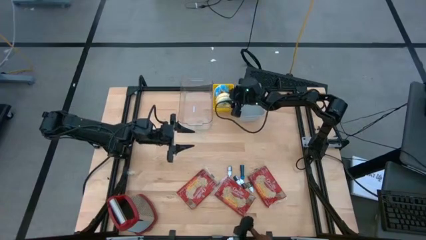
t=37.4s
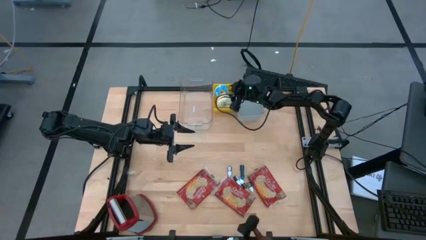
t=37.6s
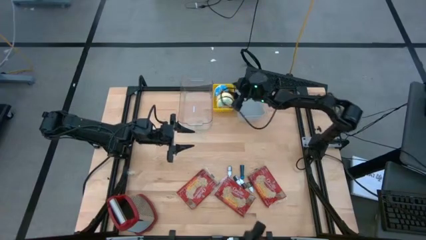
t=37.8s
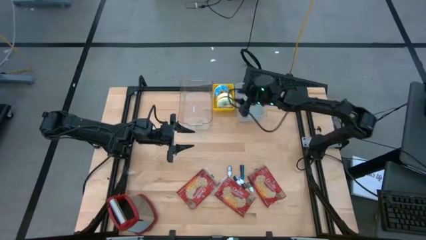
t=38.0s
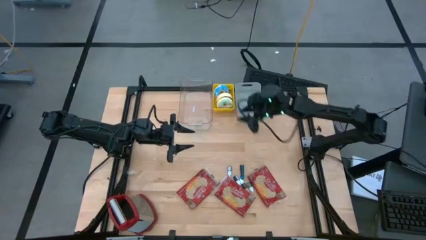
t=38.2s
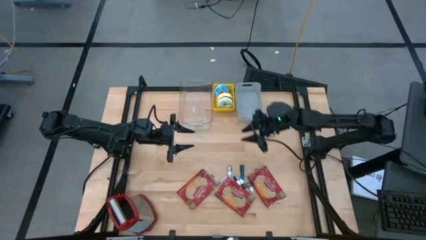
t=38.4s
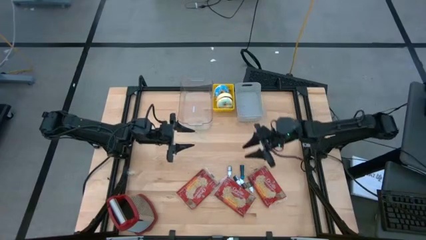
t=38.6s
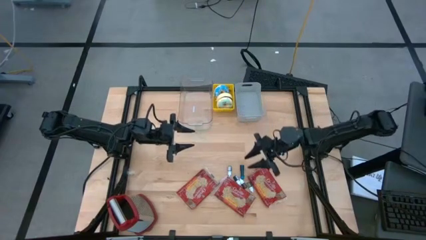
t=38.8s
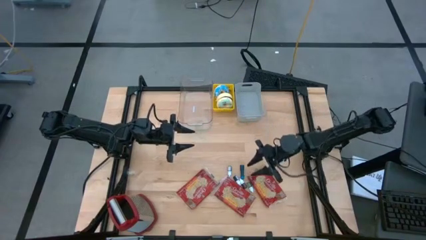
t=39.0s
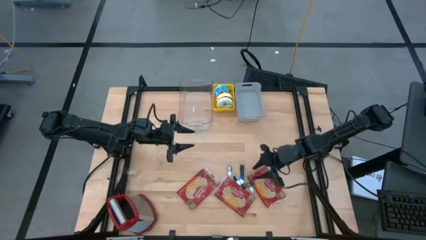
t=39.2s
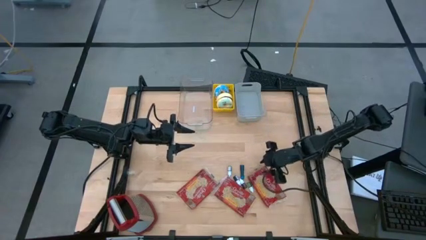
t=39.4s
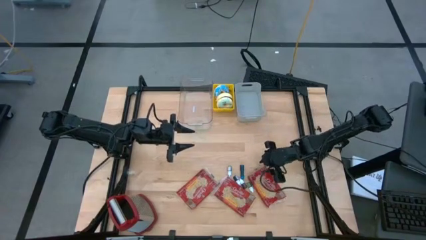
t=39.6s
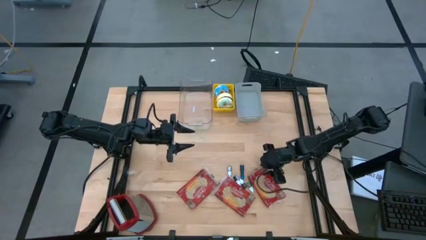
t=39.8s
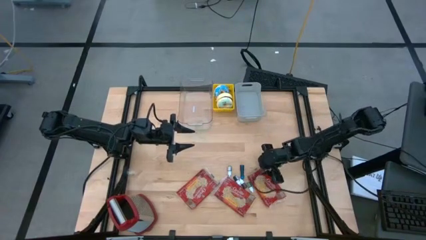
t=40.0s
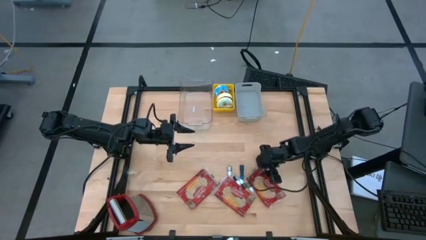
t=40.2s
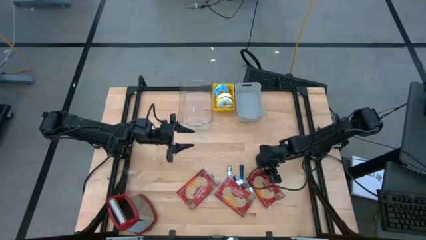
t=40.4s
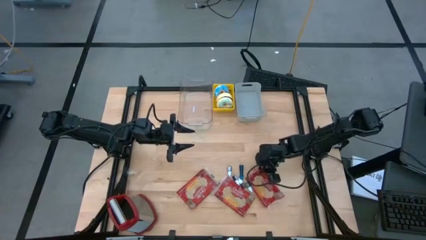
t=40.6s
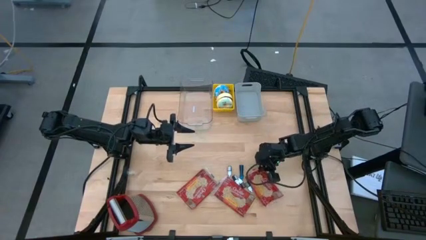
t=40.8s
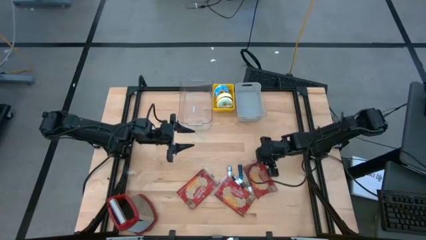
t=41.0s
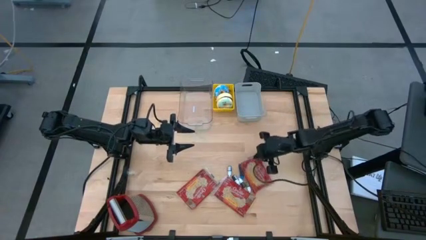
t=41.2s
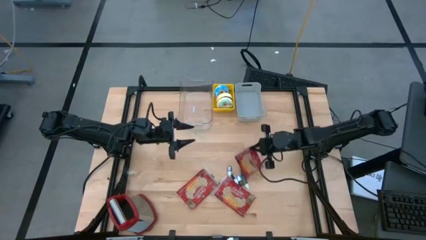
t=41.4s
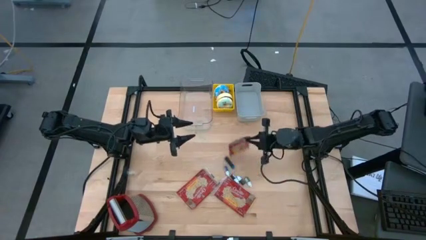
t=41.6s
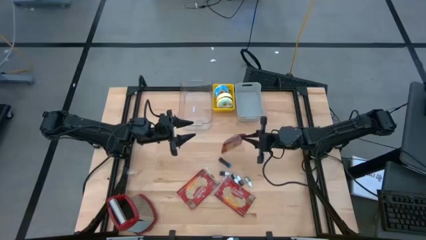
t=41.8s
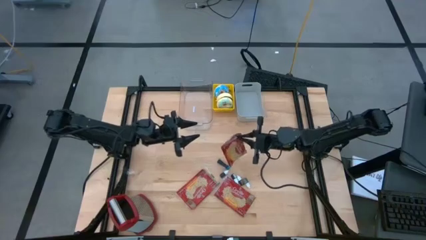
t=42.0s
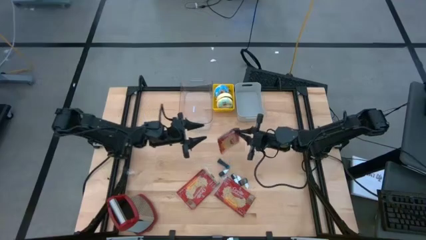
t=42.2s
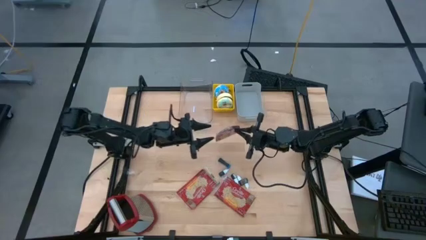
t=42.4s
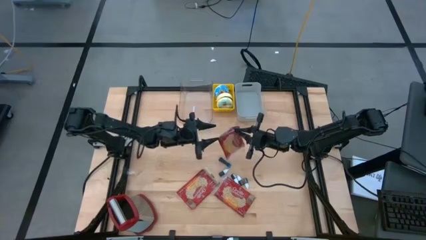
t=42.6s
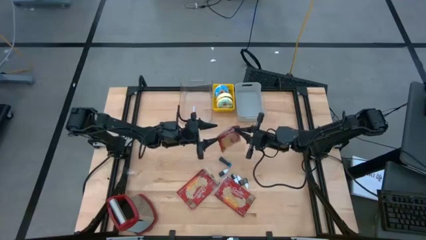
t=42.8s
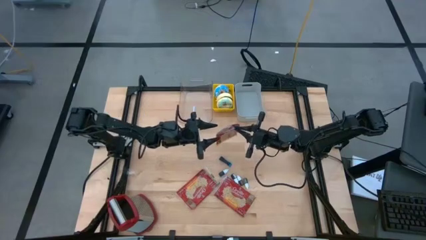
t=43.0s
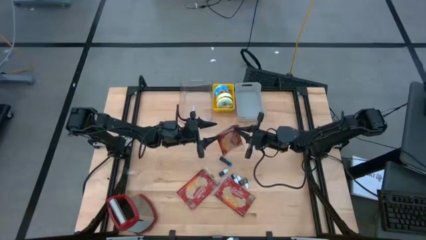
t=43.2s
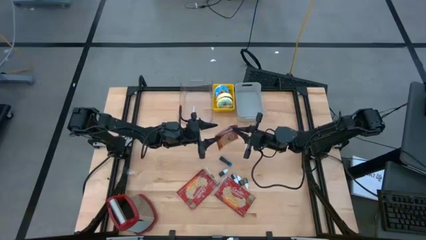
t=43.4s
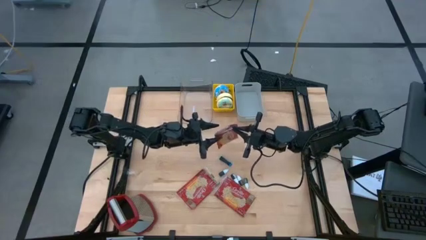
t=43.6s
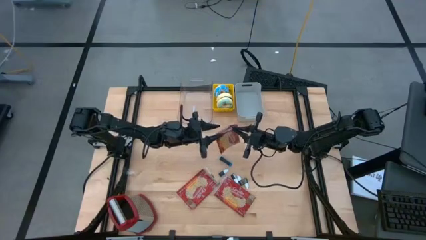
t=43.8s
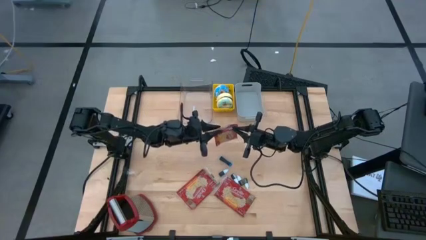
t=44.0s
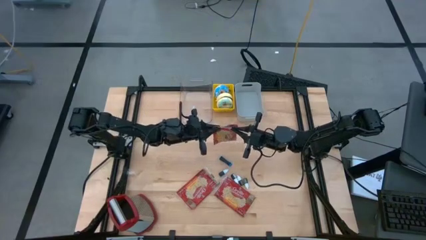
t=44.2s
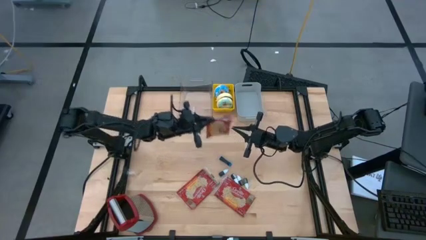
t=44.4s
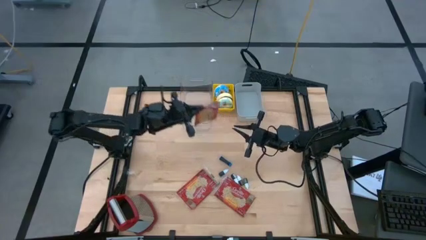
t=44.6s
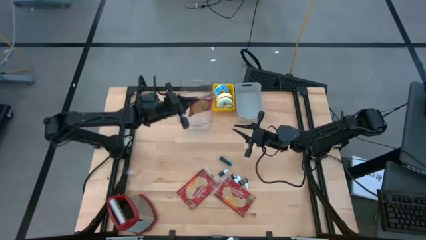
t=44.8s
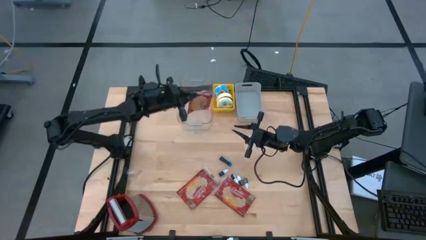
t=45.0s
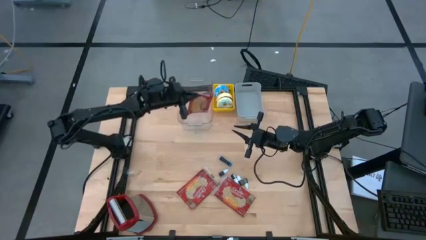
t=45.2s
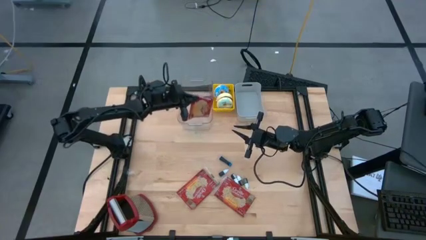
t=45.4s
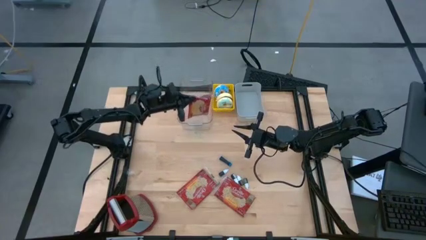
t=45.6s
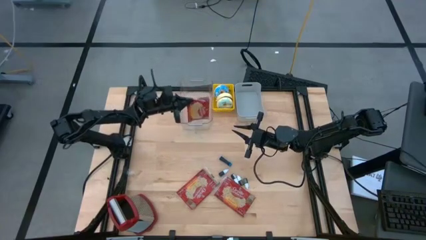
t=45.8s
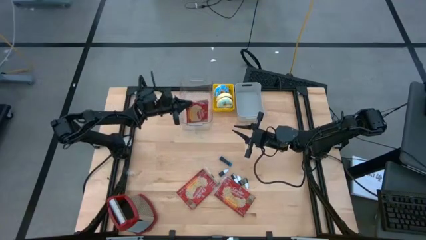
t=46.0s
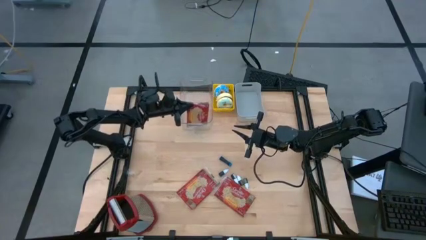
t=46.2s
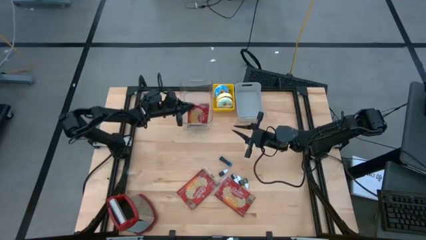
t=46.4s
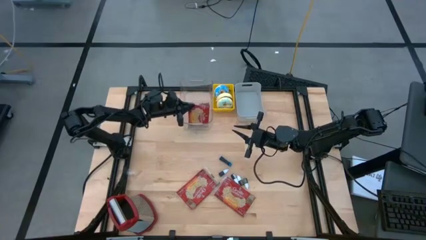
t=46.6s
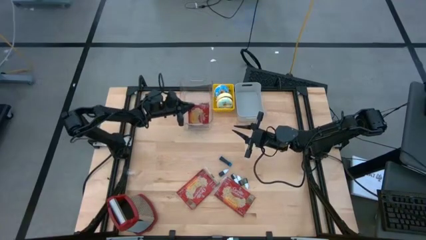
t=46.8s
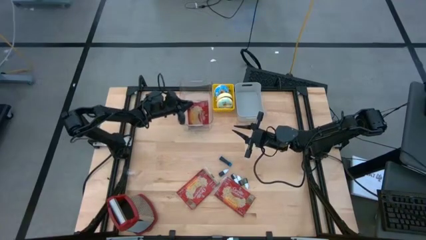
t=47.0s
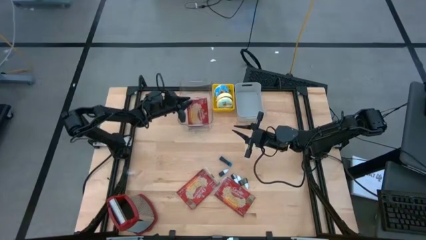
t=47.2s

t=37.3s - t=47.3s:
Put the right red popcorn bag into the clear bin

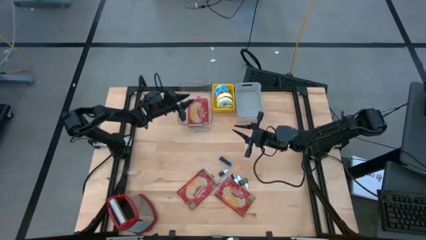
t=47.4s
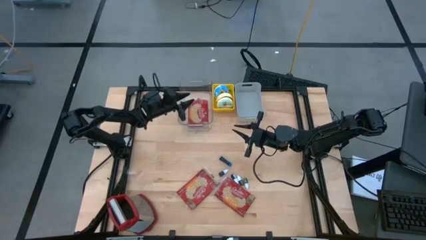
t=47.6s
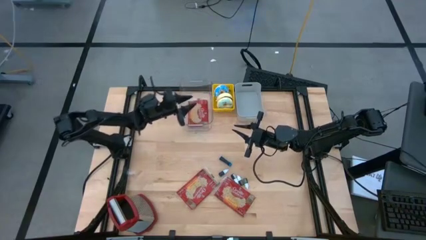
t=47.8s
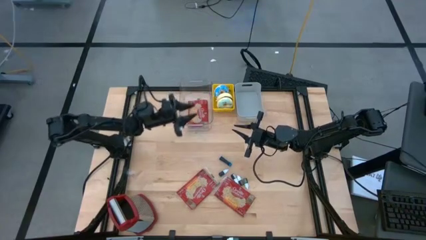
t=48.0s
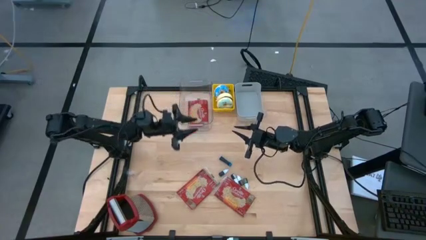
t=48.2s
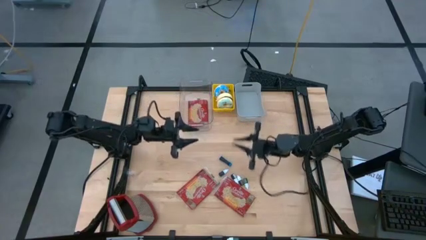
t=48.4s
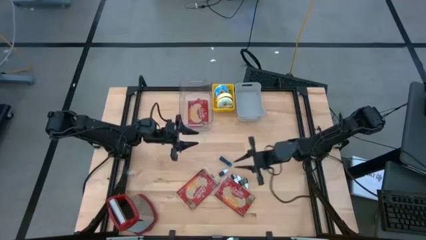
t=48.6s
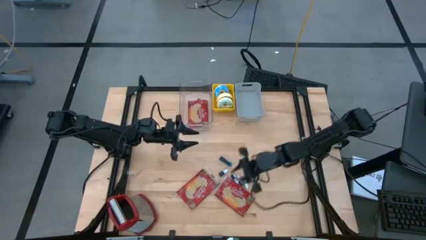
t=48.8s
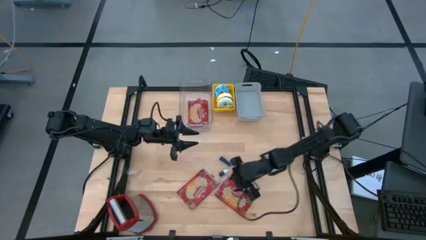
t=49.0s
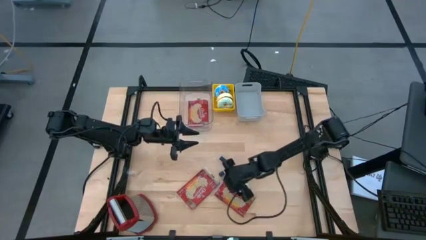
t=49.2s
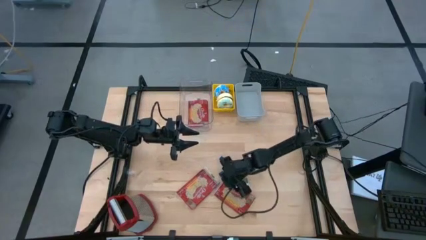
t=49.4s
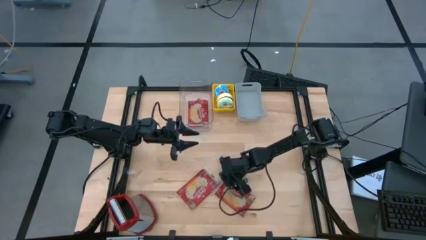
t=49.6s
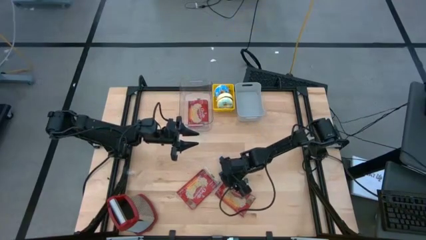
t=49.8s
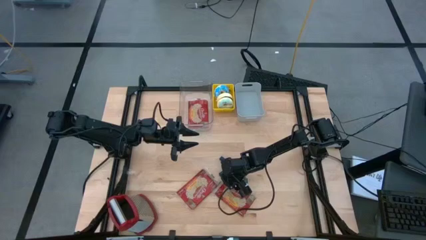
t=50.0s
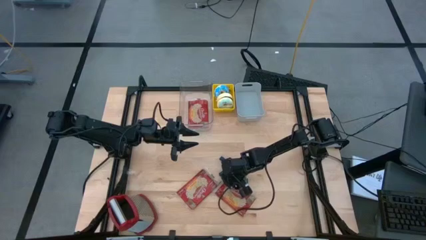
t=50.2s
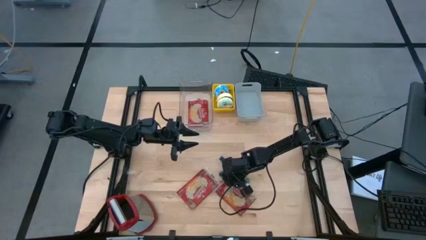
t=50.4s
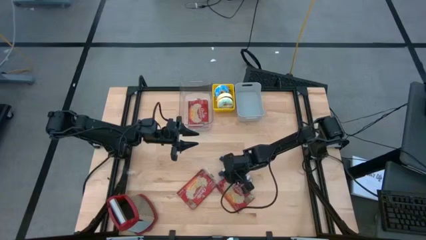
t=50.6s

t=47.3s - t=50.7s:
Stack the right red popcorn bag on top of the red popcorn bag in the clear bin

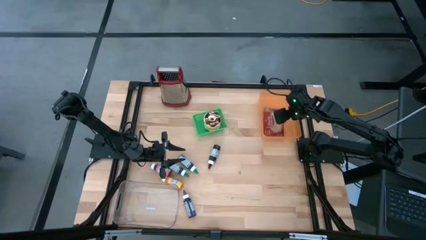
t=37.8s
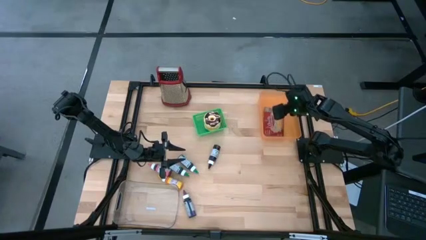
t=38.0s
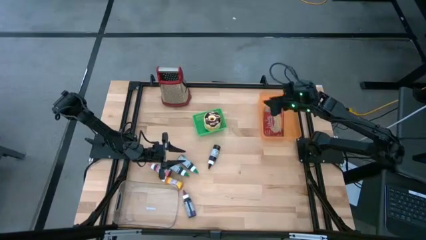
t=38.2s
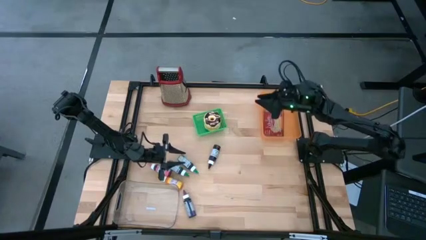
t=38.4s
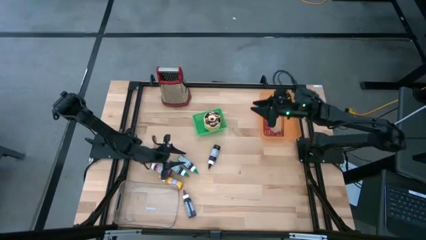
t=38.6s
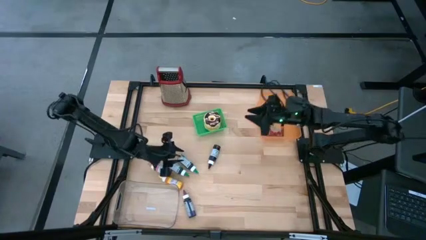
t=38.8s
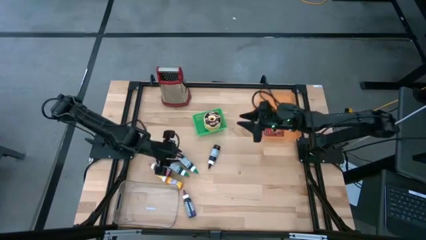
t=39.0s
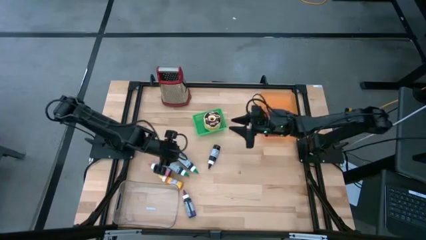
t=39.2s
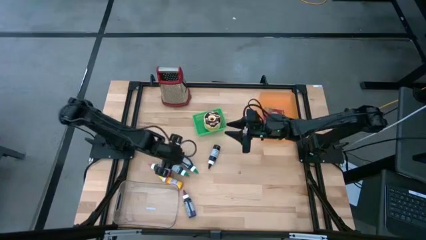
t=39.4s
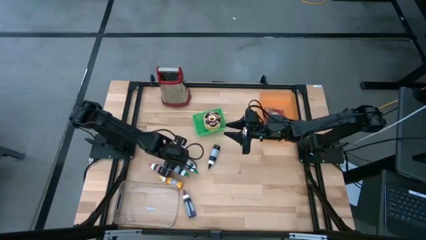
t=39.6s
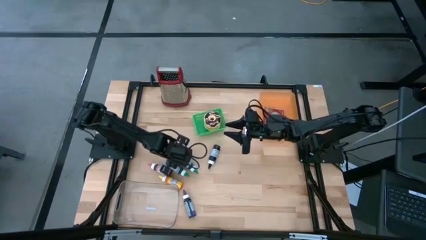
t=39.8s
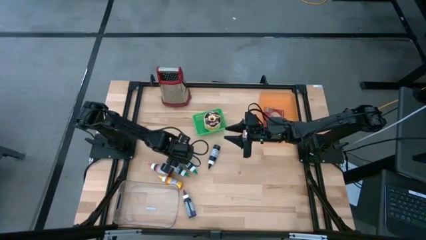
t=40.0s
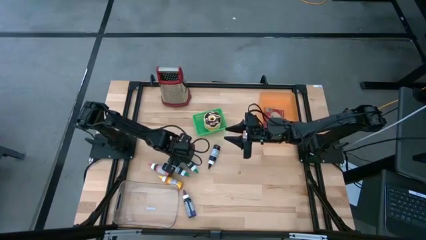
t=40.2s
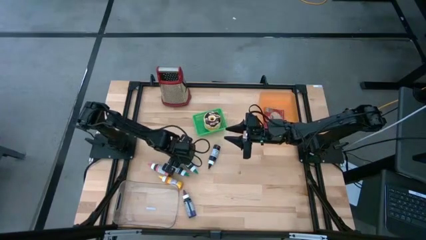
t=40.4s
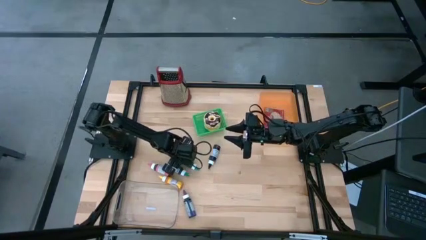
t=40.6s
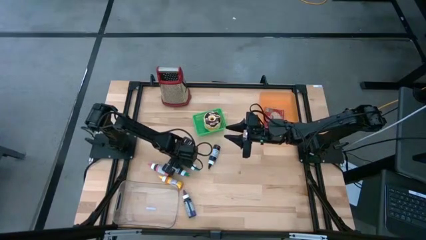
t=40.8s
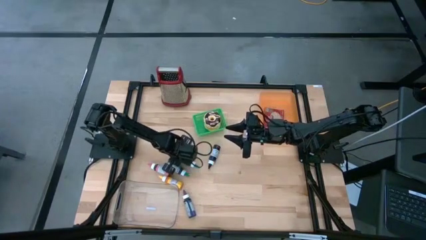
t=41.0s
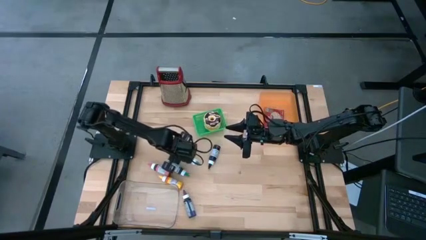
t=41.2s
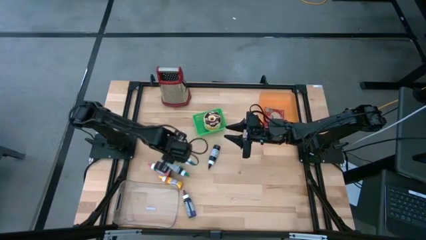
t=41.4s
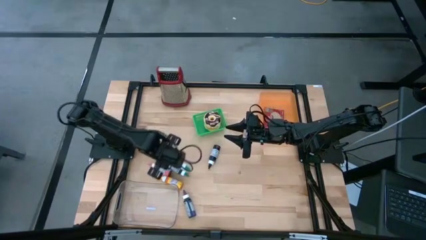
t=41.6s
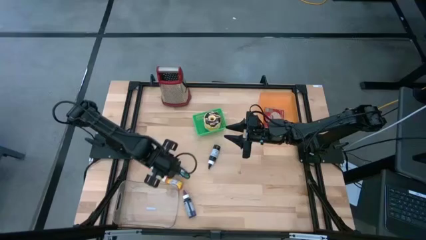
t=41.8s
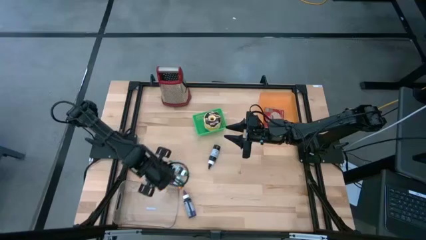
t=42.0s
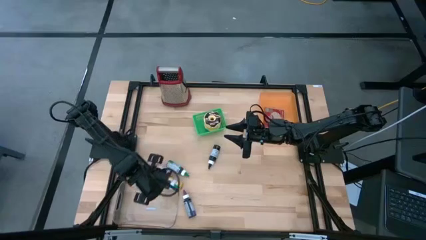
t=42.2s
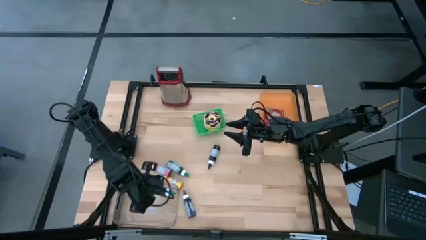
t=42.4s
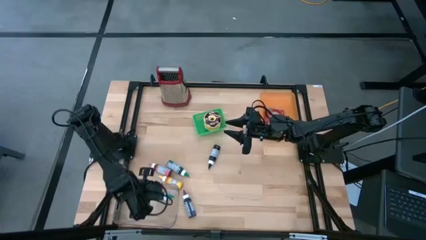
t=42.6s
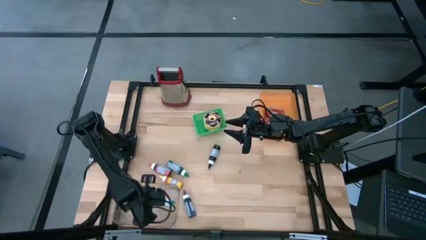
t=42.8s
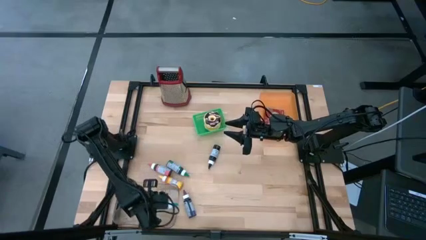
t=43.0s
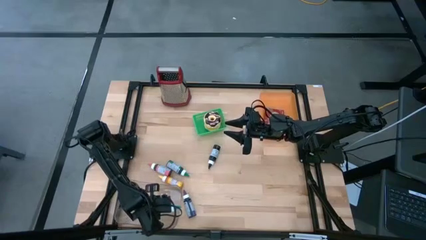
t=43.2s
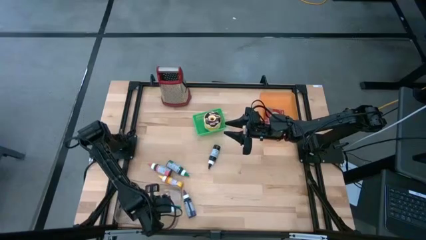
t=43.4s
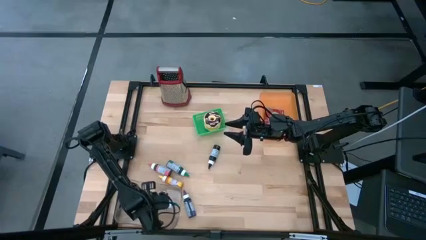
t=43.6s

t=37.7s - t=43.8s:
Put the top green food coloring bottle into the transparent bin
